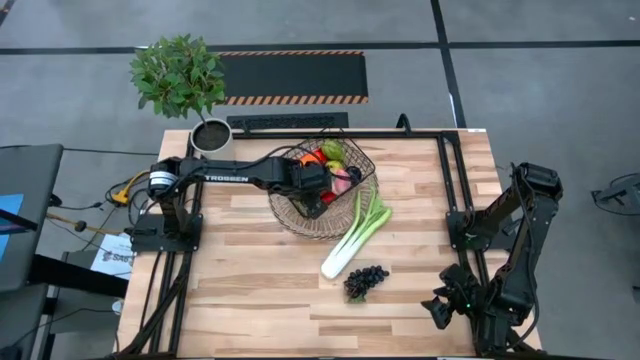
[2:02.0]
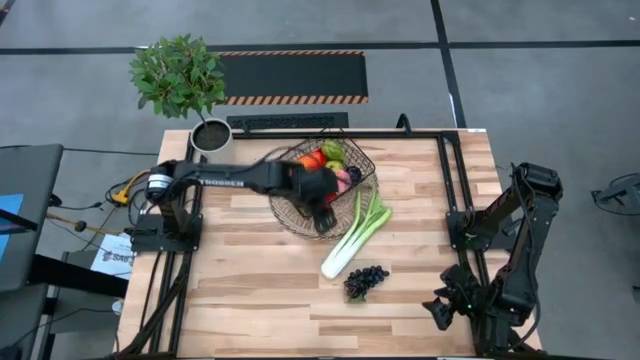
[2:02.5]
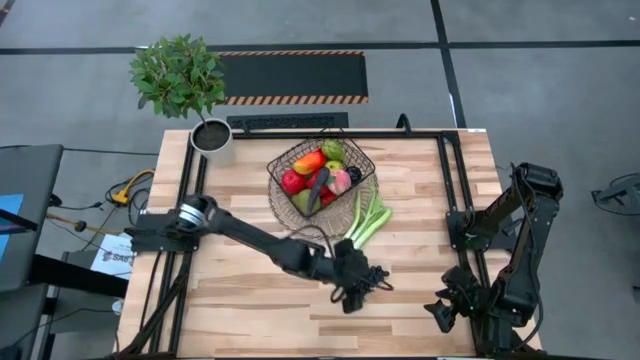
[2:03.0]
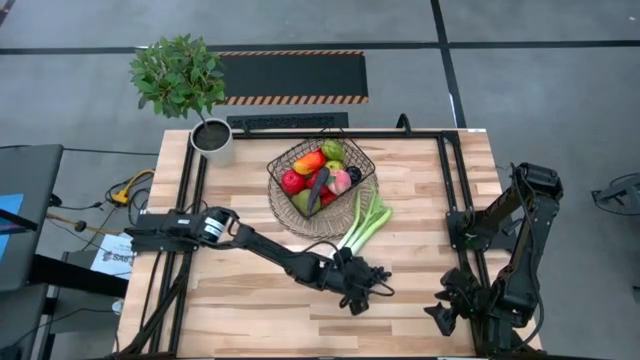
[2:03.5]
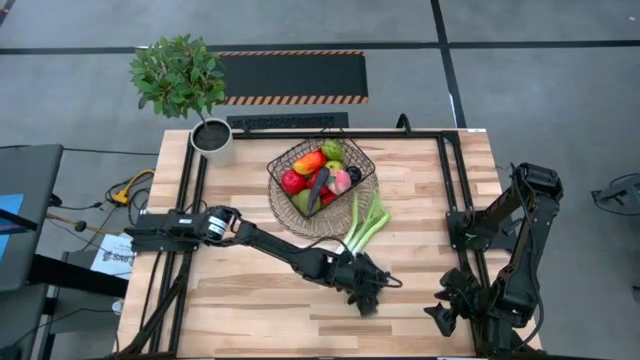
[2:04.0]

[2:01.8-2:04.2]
Task: Build produce basket
Put the black grapes into the wire basket

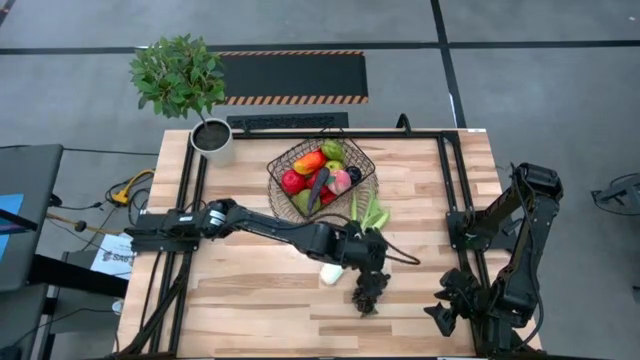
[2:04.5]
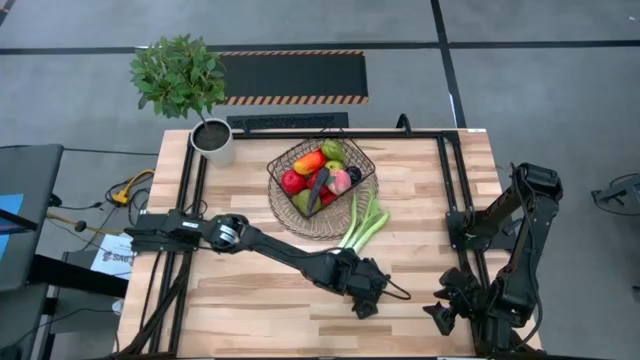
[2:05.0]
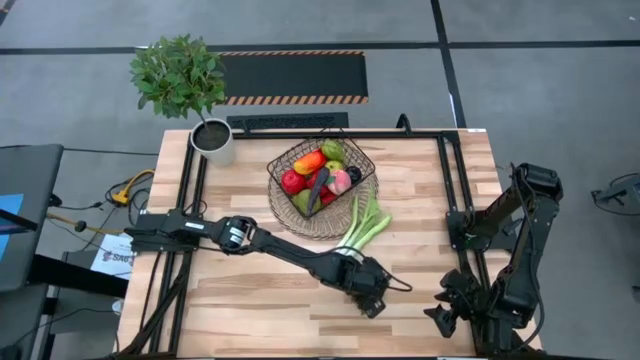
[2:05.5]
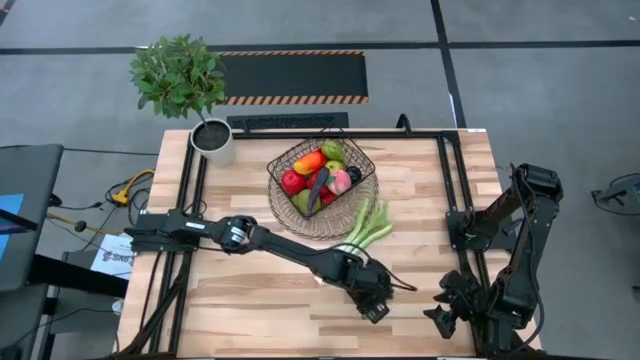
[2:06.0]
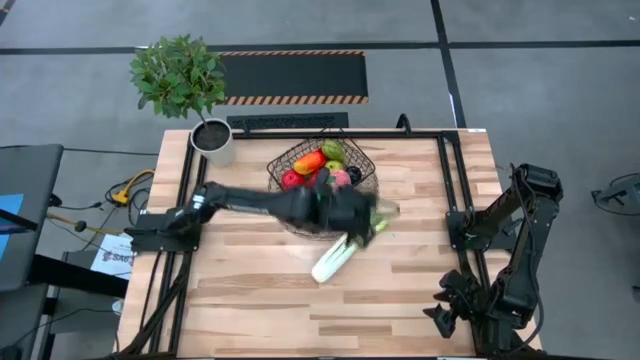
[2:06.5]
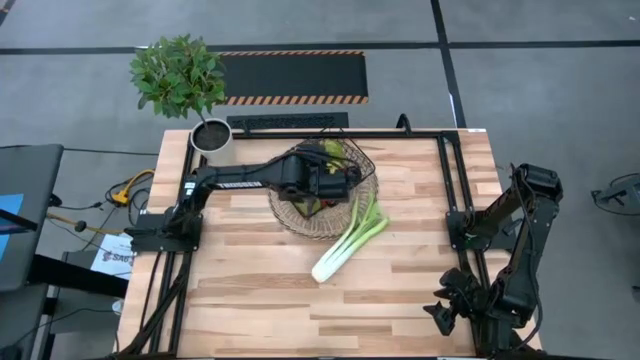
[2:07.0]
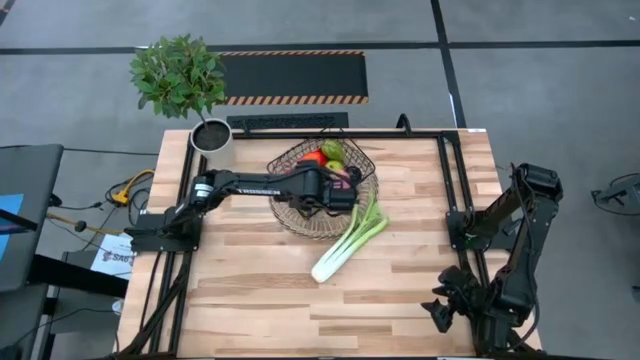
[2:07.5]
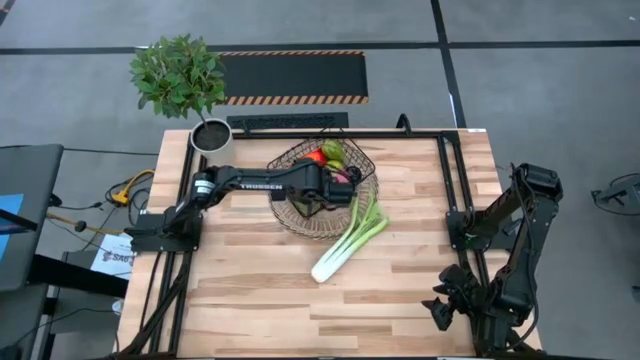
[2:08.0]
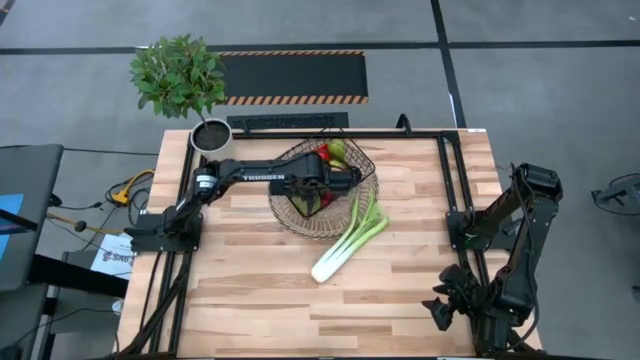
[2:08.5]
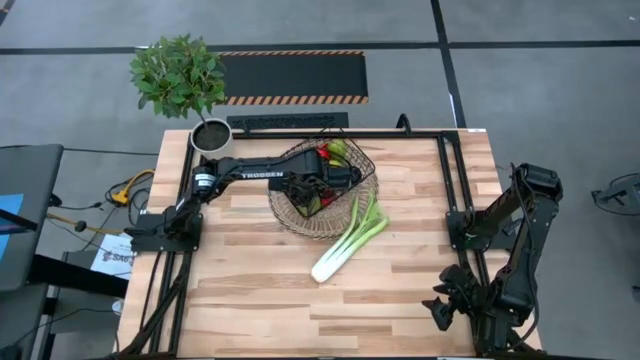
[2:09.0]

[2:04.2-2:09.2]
Put the black grapes into the wire basket

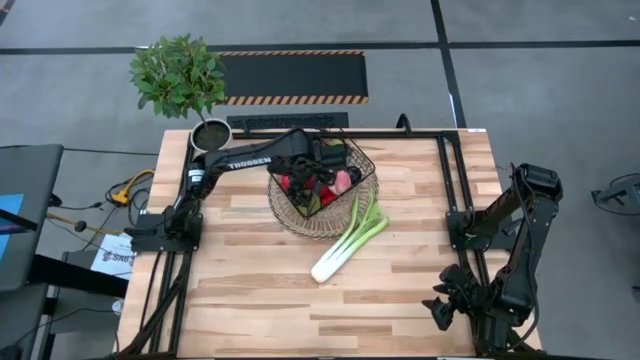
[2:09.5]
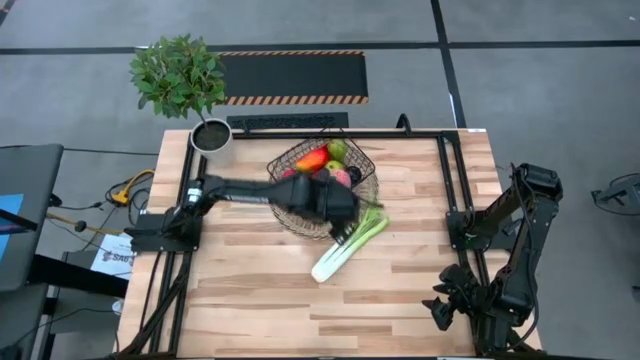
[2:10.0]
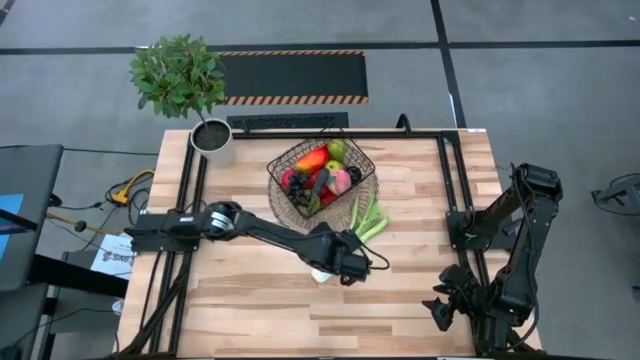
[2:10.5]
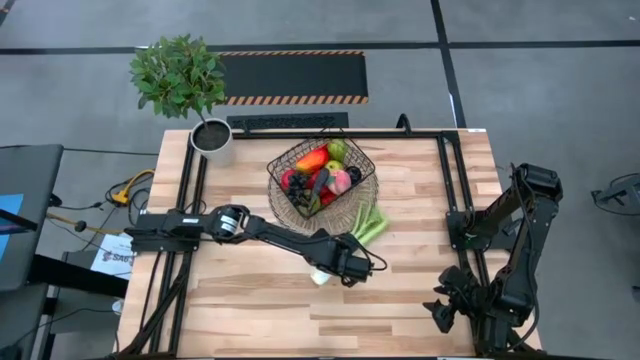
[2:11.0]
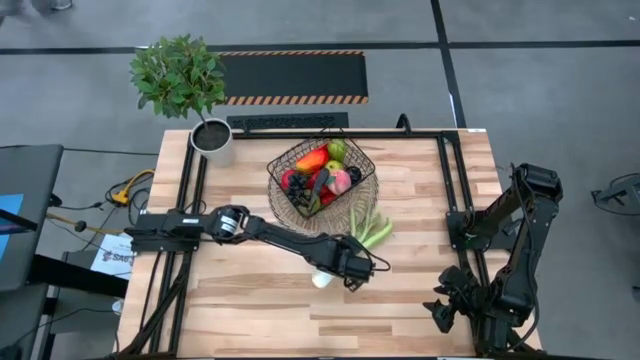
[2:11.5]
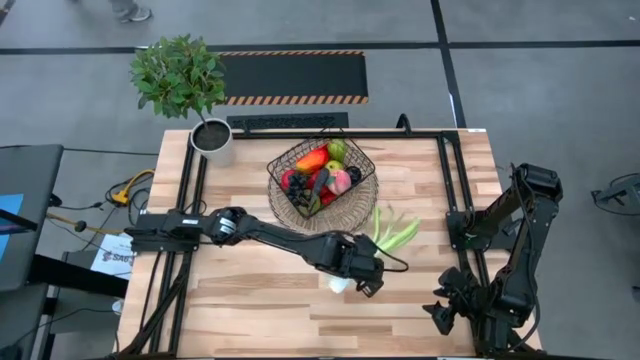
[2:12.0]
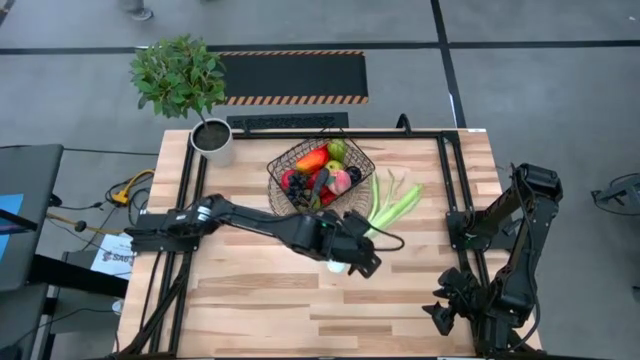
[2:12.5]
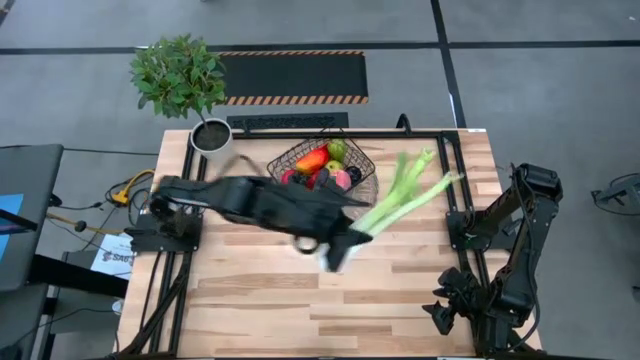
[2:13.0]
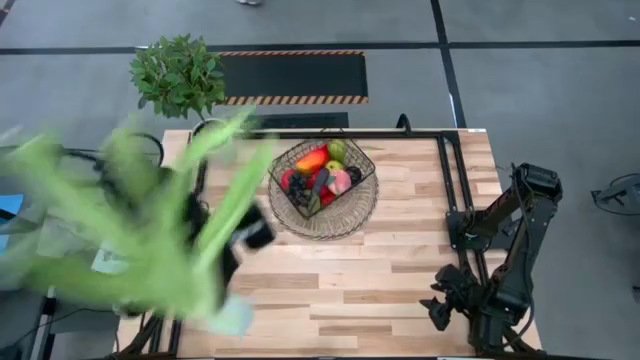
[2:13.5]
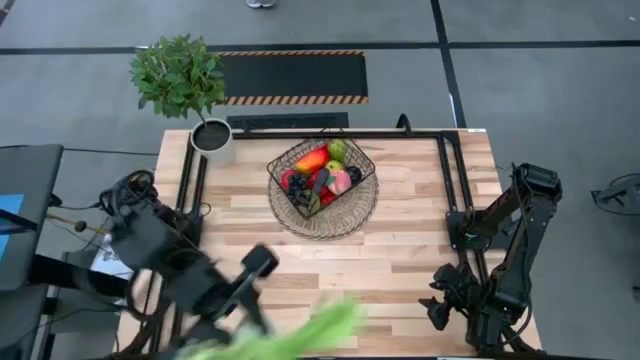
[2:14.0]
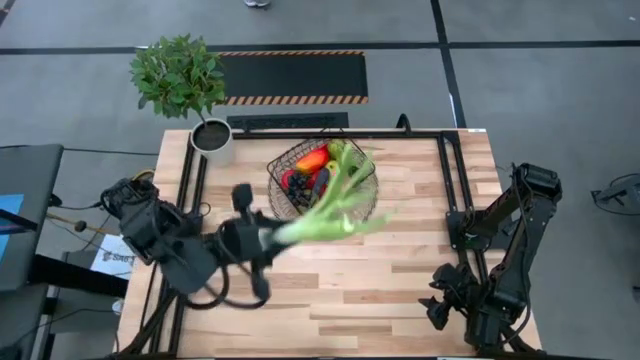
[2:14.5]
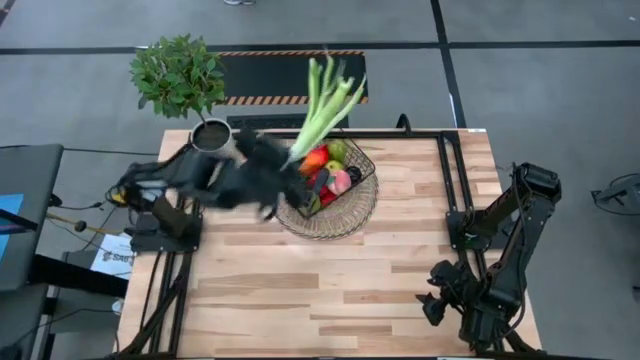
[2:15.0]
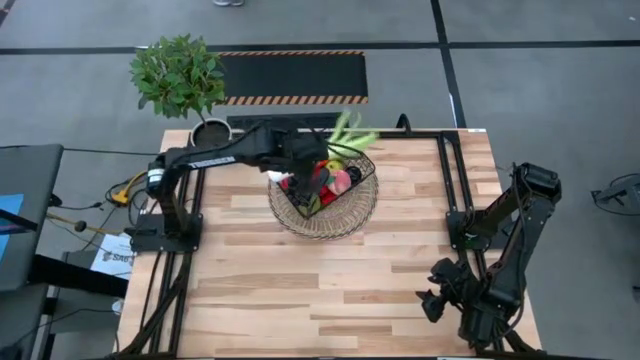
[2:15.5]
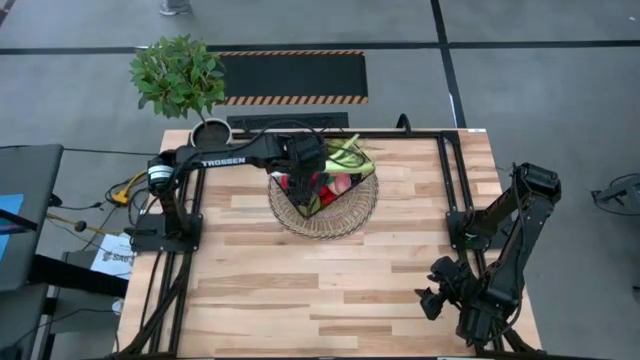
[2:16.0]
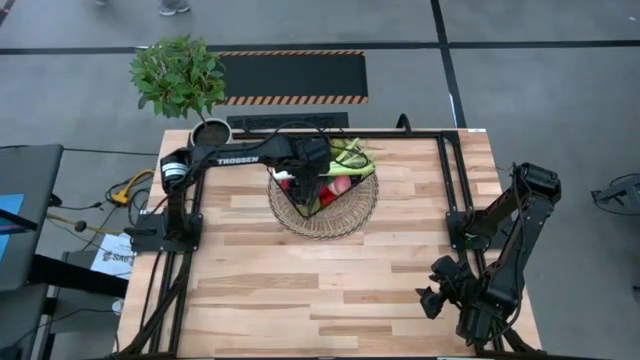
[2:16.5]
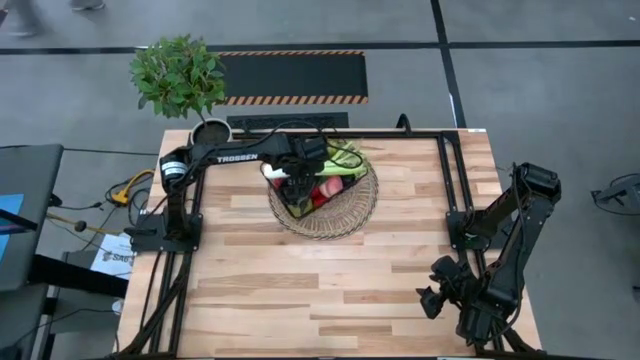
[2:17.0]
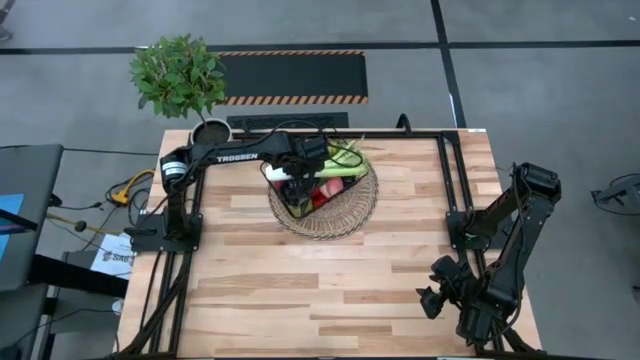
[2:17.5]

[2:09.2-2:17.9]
Put the green celery into the wire basket

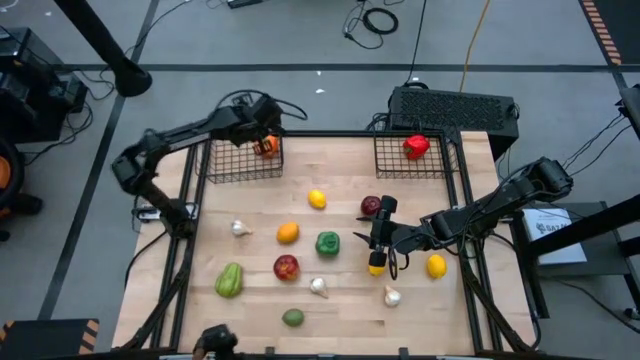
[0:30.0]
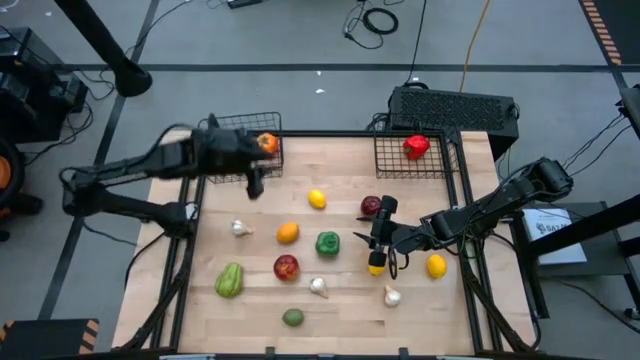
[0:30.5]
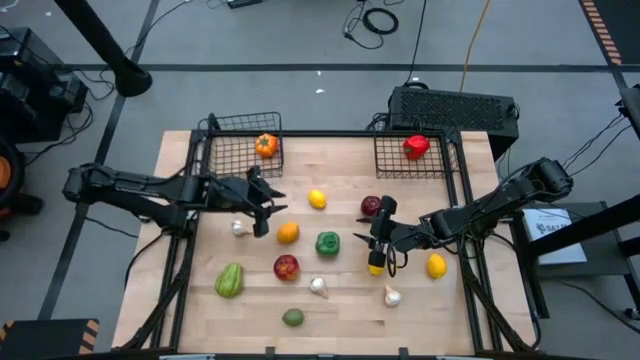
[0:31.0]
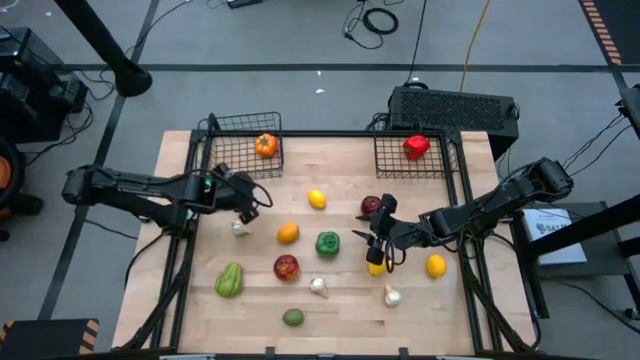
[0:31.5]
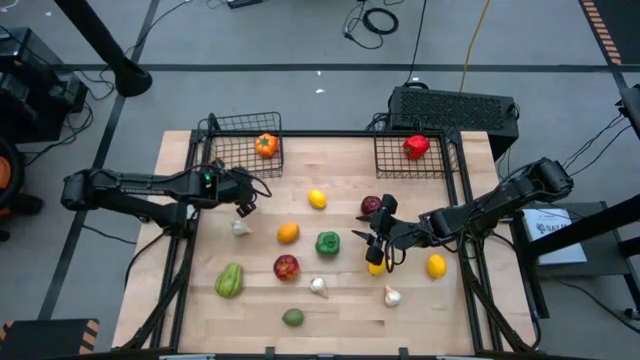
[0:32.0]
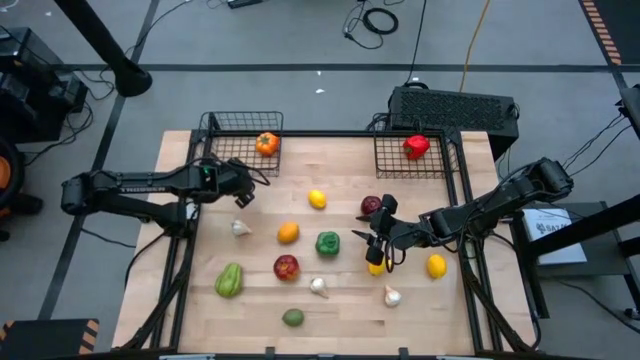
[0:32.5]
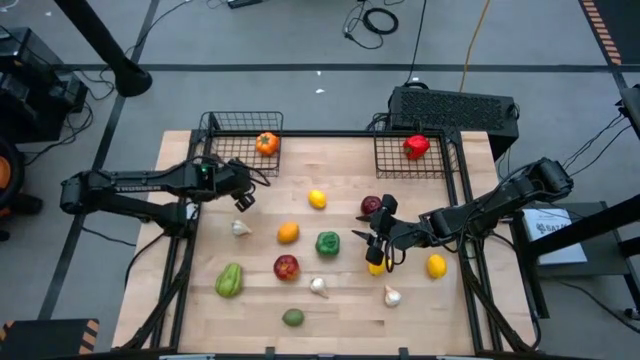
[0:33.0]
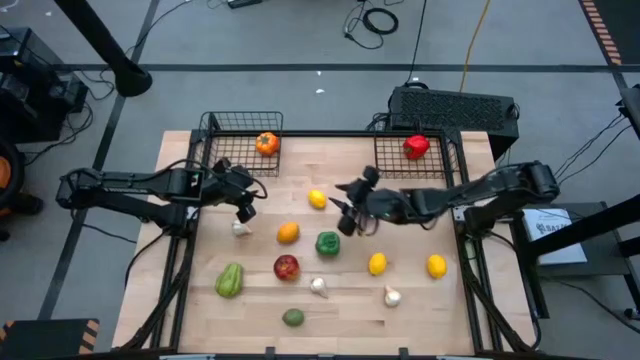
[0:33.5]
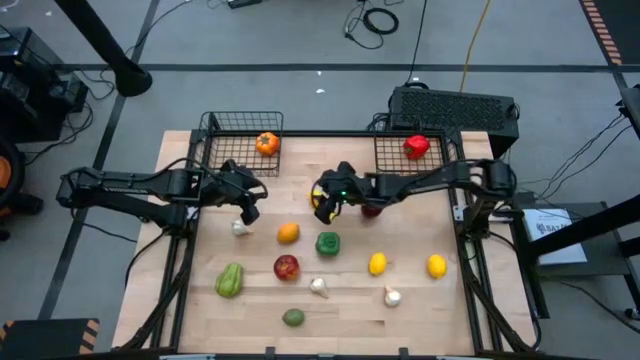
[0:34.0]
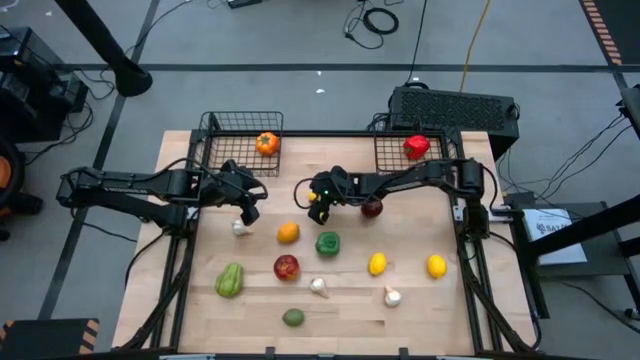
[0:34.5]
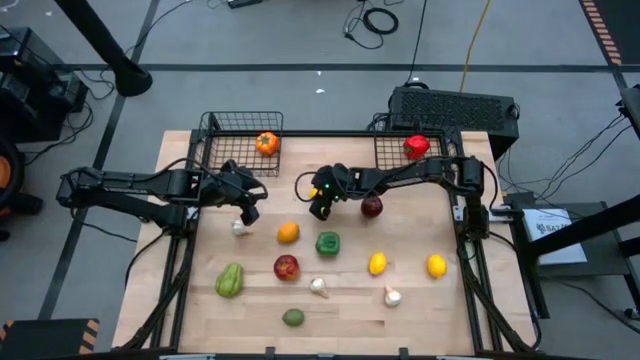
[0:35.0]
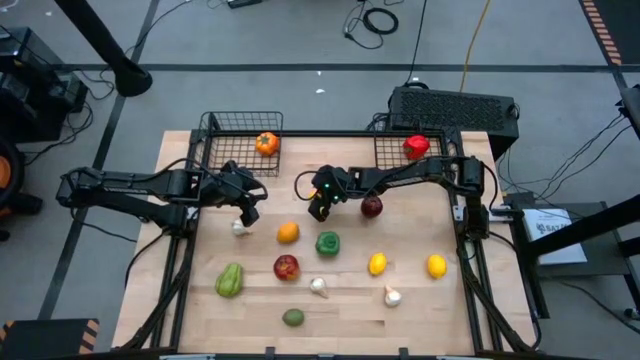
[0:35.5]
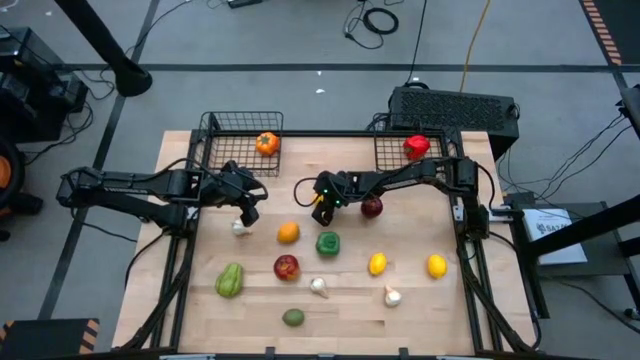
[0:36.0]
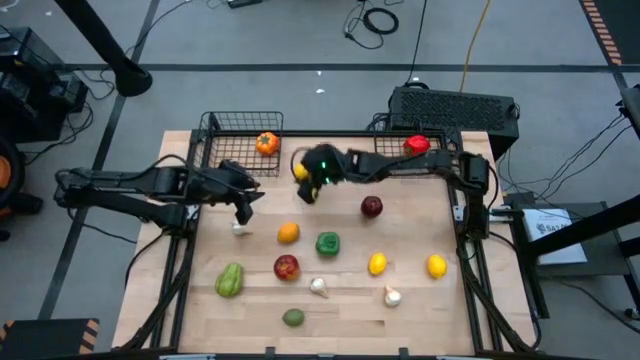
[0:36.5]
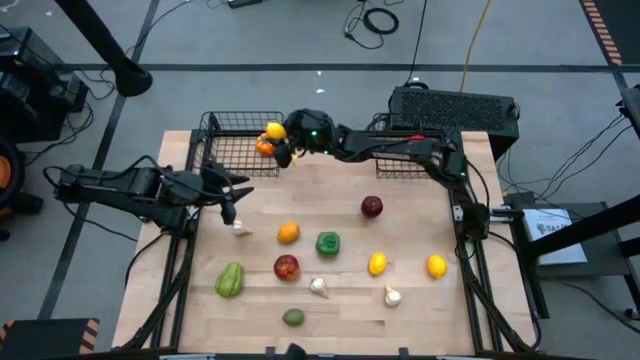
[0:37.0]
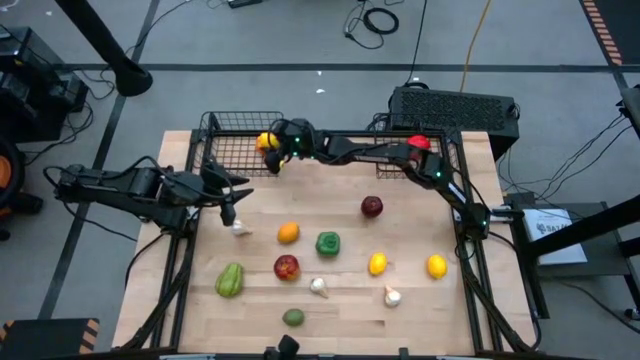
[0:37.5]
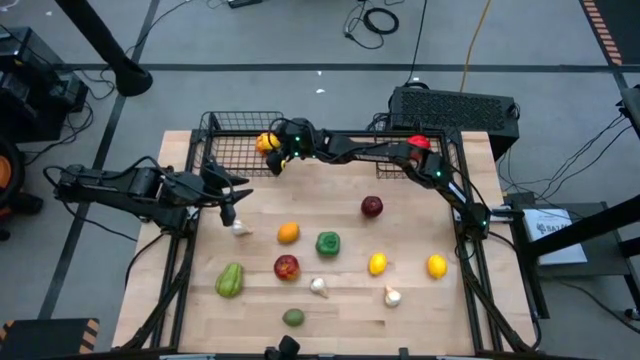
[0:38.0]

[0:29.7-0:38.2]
Task: Sort produce into baskets
Put the top yellow lemon in the left basket
